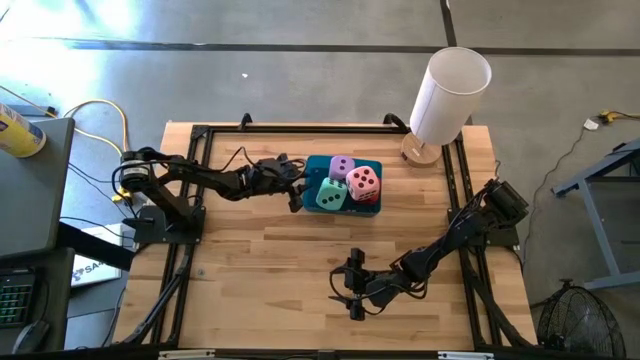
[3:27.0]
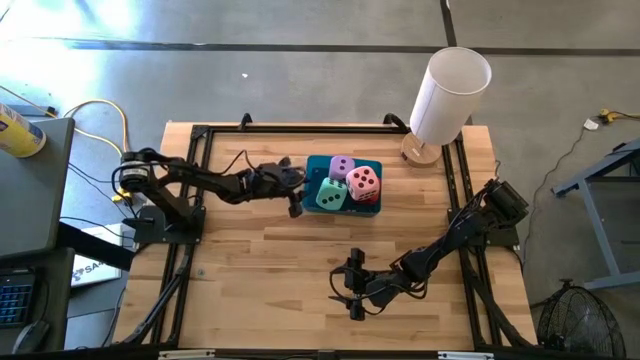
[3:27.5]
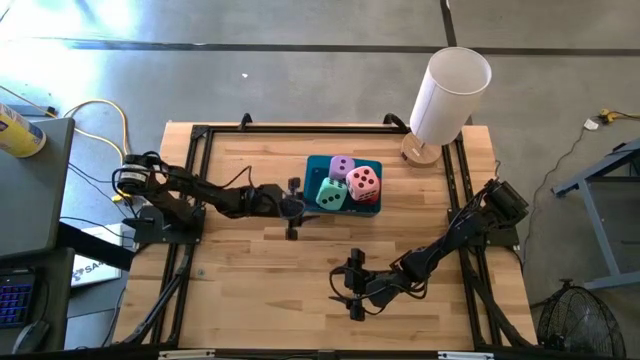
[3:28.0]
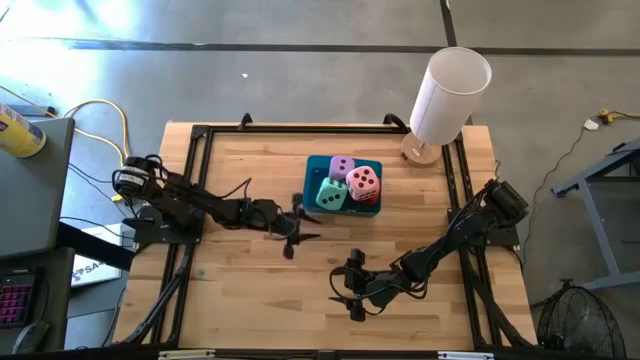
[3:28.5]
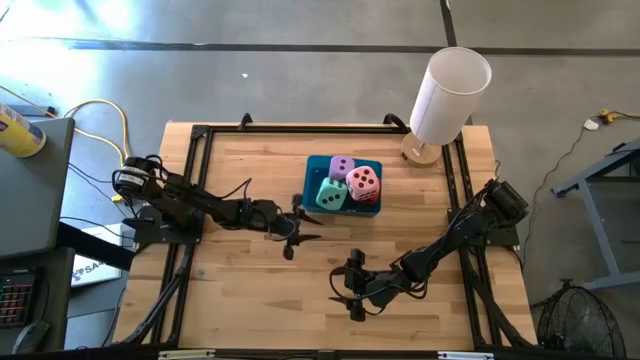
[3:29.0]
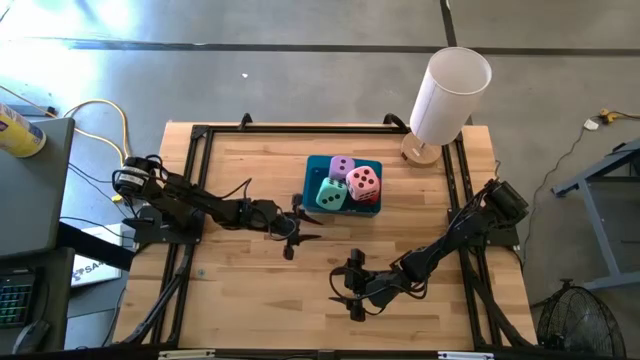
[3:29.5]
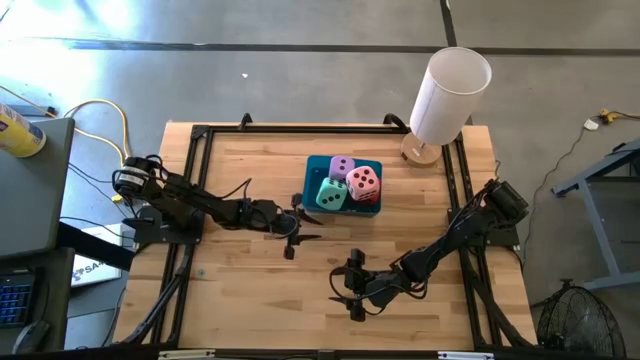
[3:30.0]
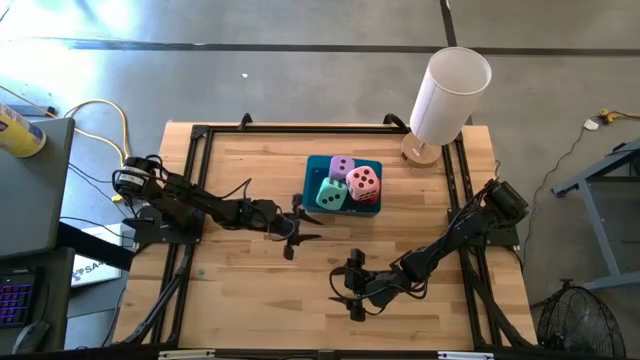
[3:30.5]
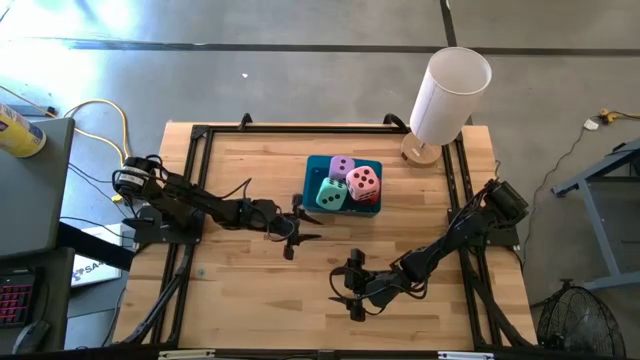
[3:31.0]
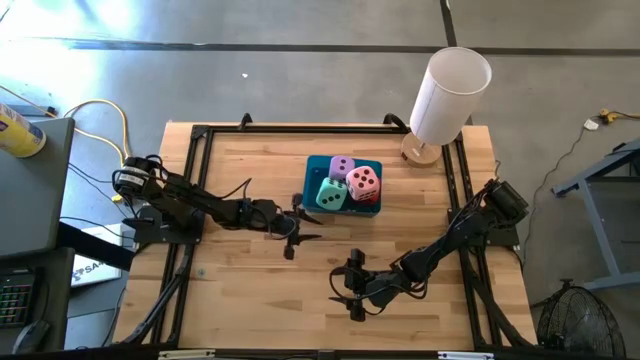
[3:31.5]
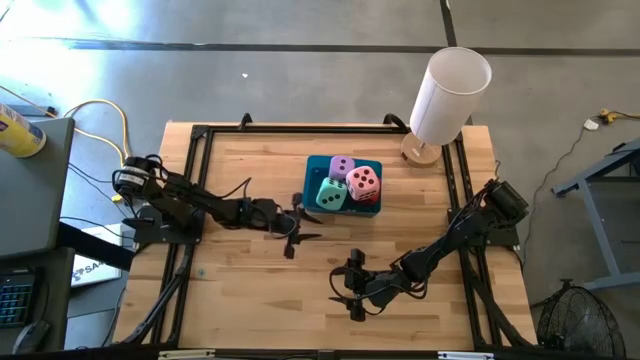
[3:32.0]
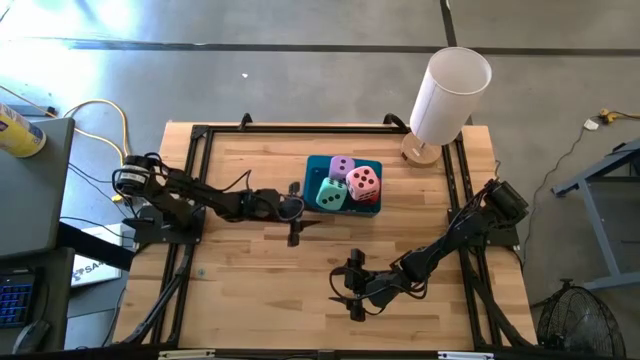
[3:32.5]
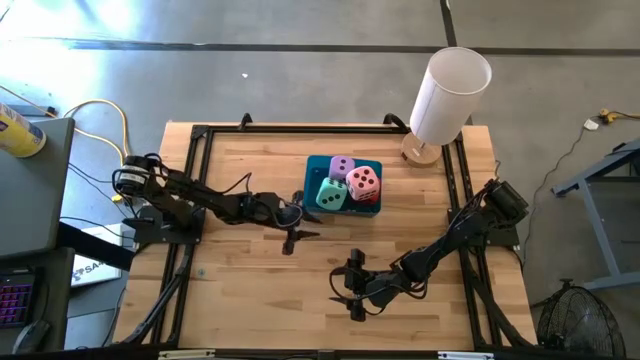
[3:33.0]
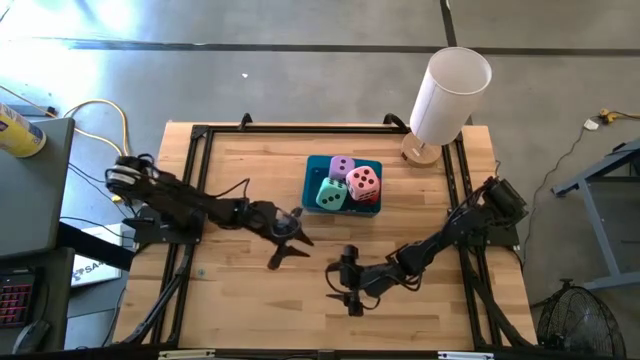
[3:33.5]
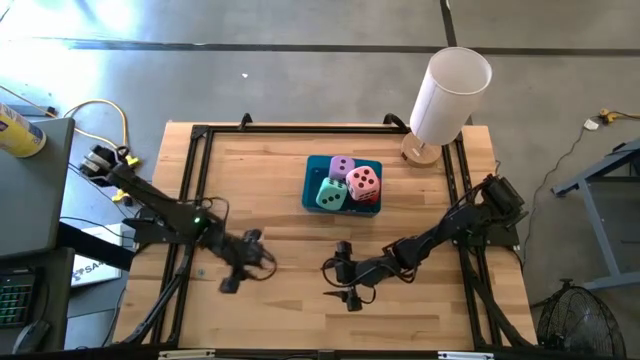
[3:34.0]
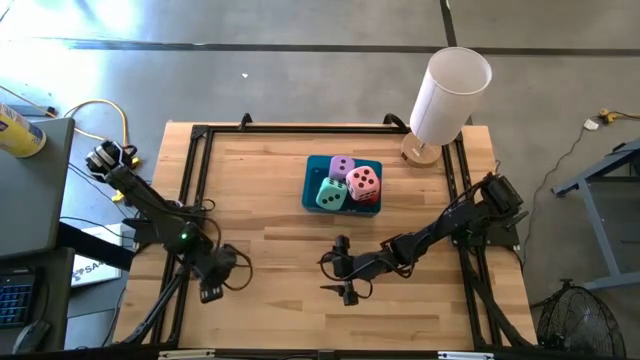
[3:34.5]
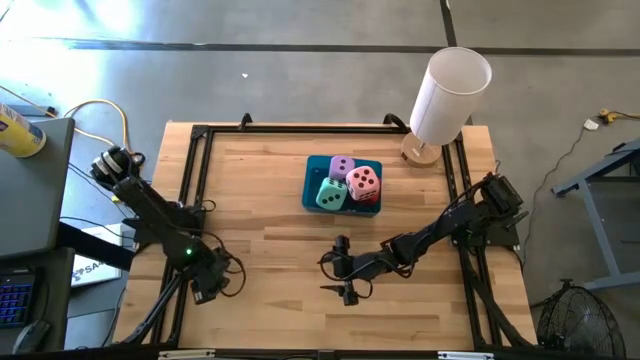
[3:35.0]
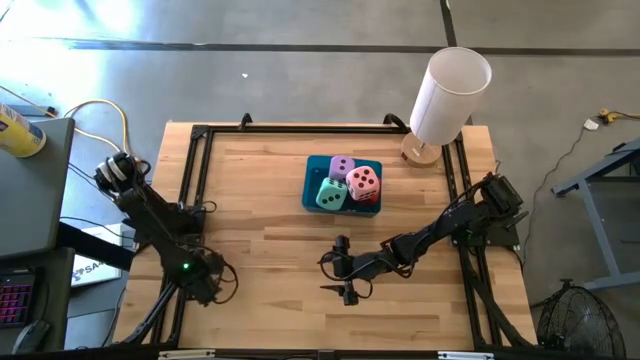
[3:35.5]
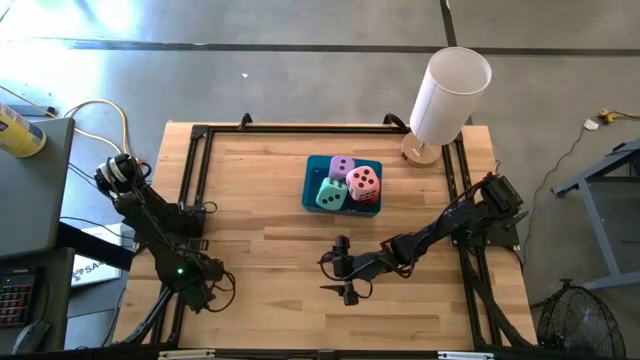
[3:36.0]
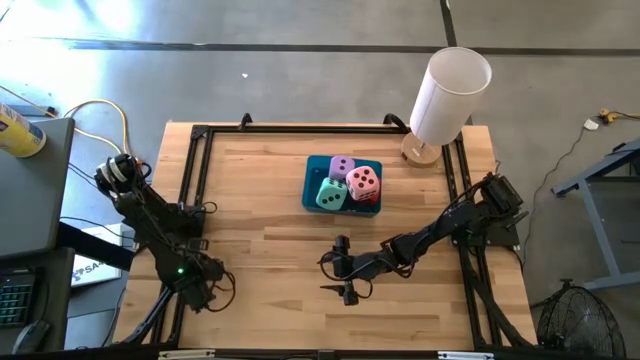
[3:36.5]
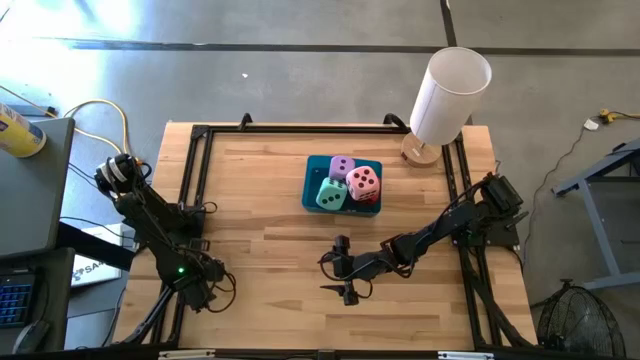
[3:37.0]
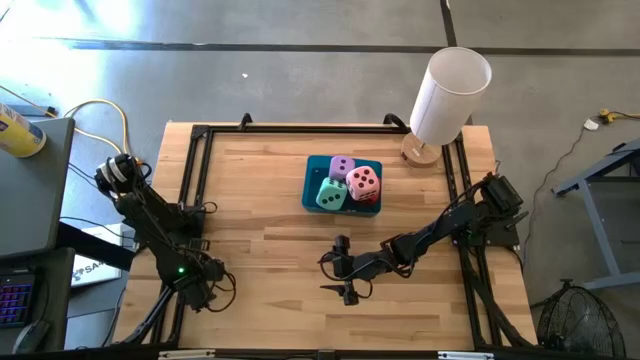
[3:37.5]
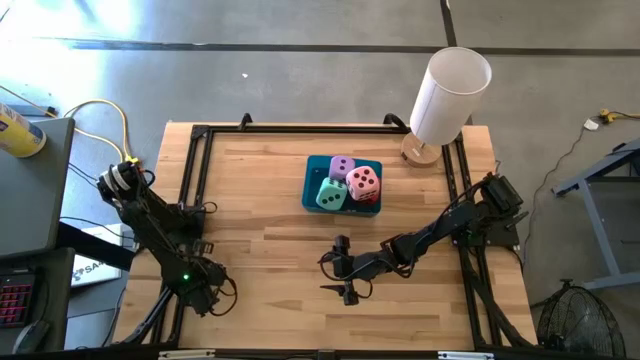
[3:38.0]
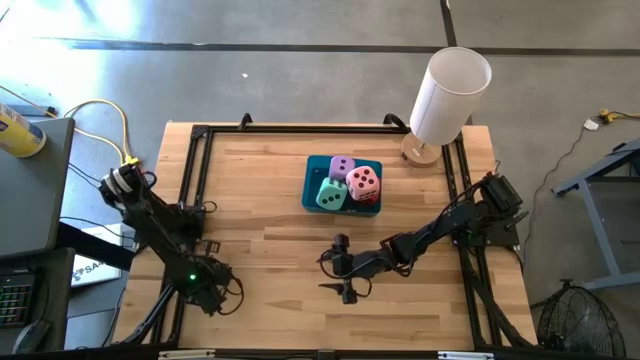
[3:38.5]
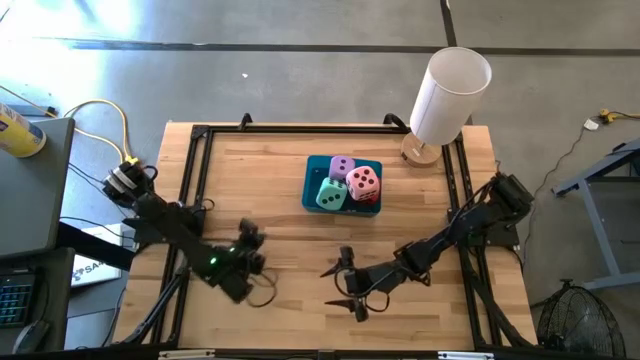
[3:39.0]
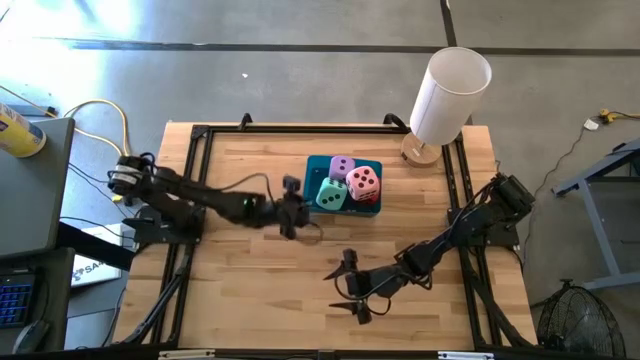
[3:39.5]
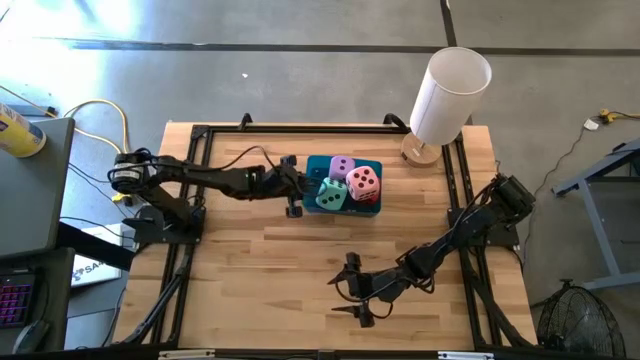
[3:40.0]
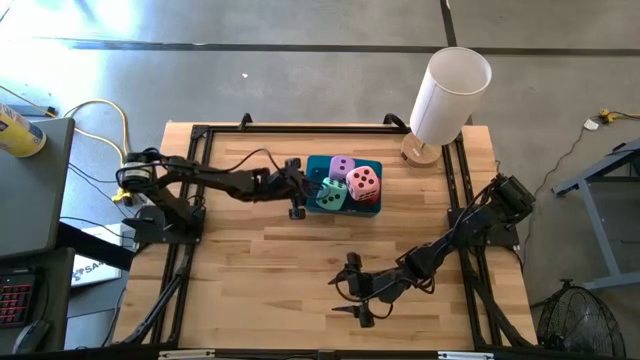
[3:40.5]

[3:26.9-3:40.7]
Task: Pick & Place Dice
Put the small blue dice into the blue bin

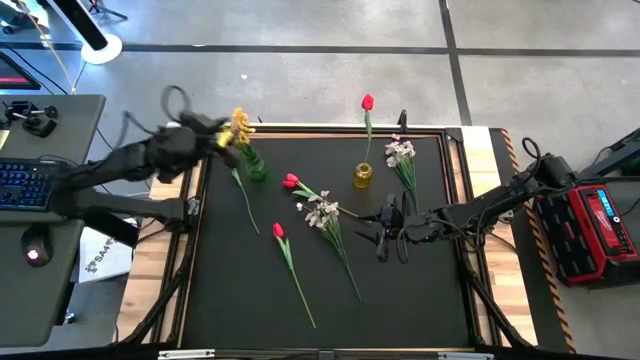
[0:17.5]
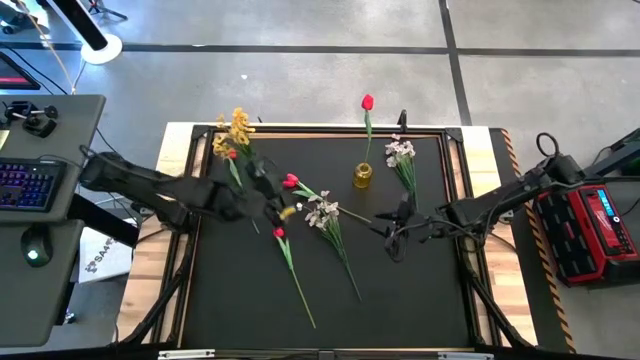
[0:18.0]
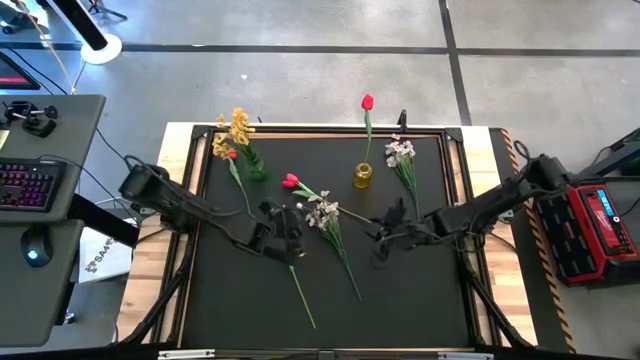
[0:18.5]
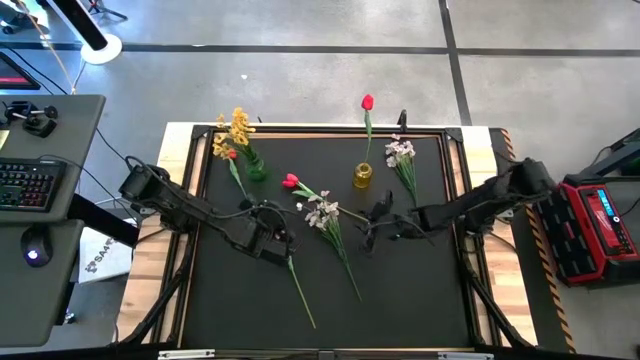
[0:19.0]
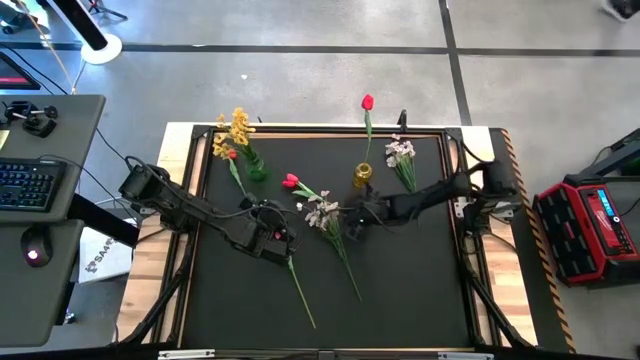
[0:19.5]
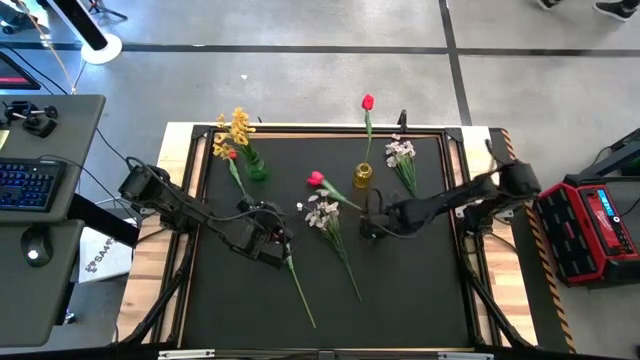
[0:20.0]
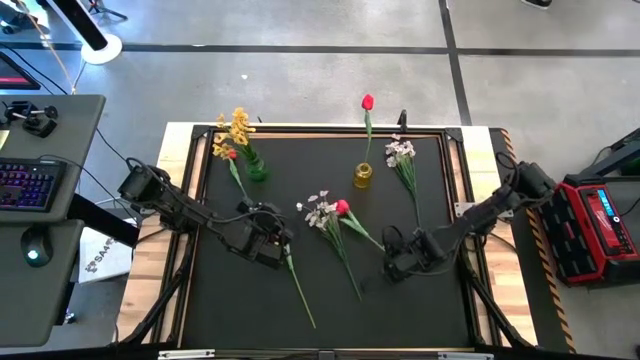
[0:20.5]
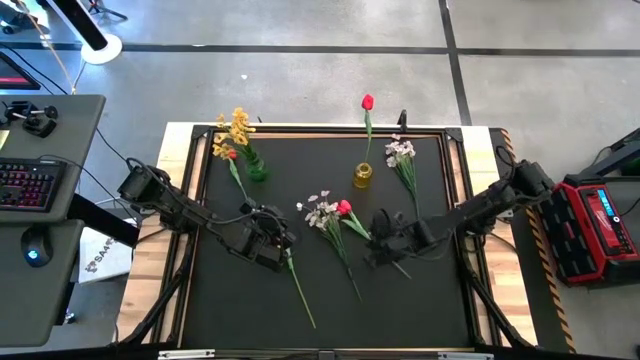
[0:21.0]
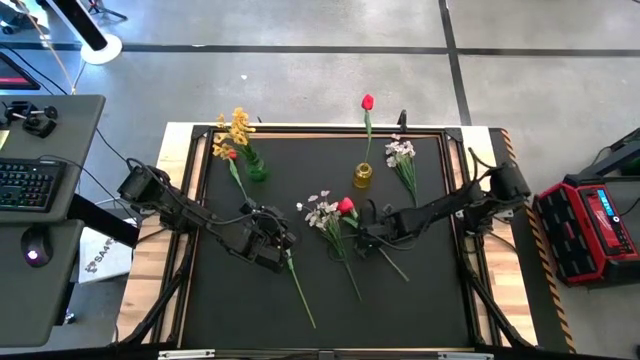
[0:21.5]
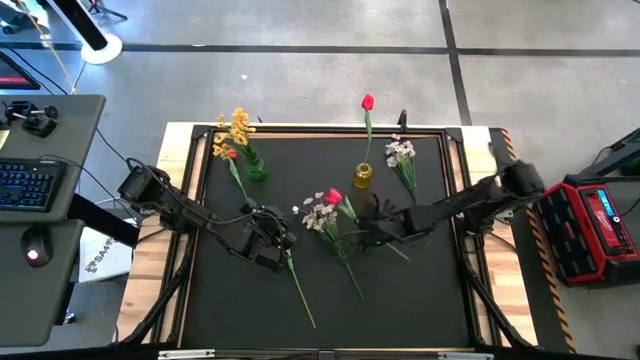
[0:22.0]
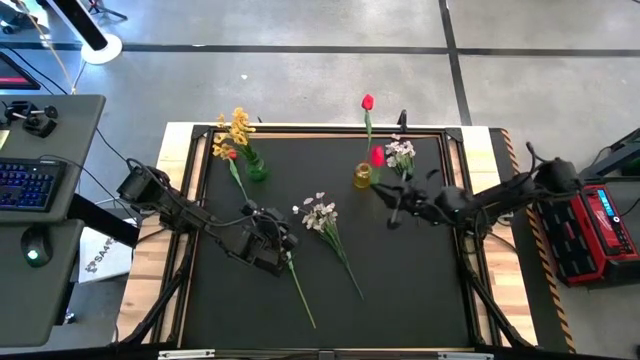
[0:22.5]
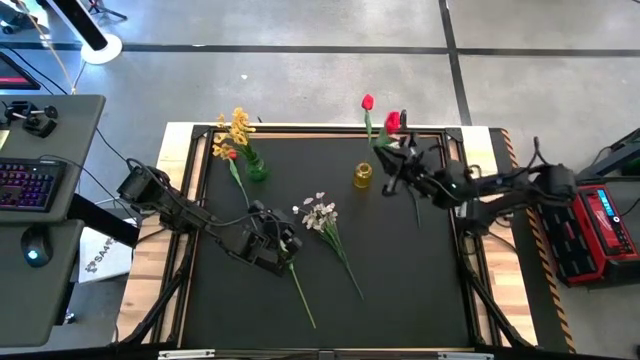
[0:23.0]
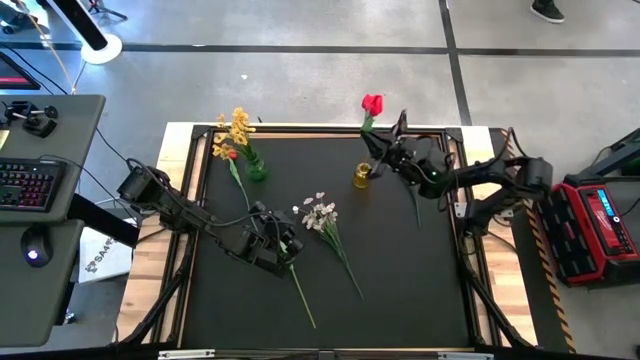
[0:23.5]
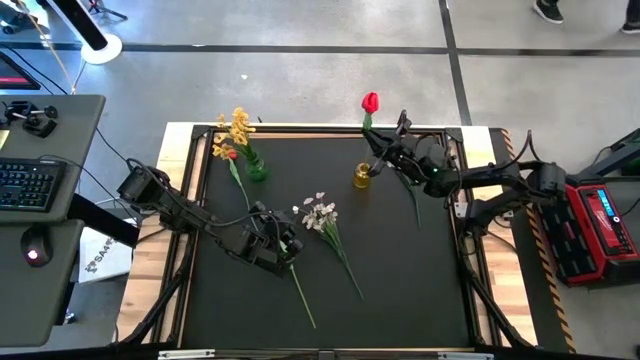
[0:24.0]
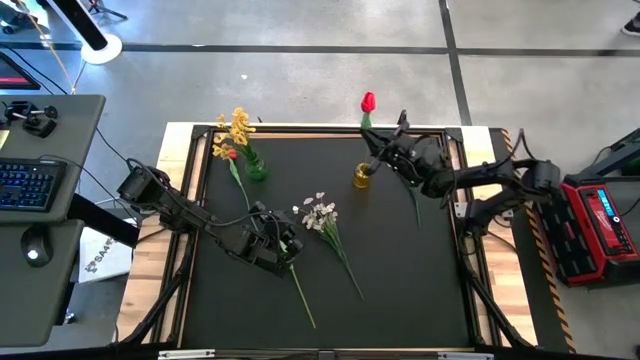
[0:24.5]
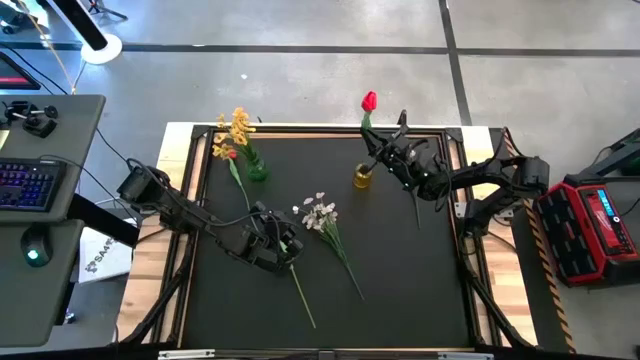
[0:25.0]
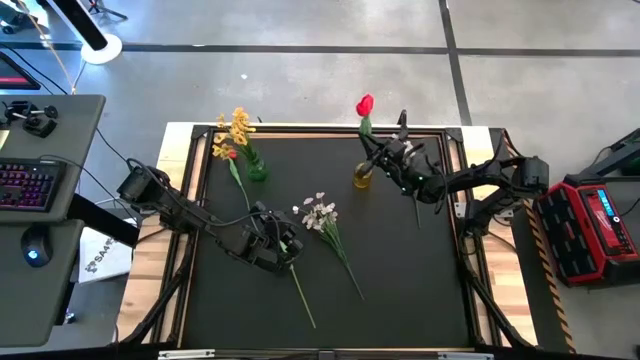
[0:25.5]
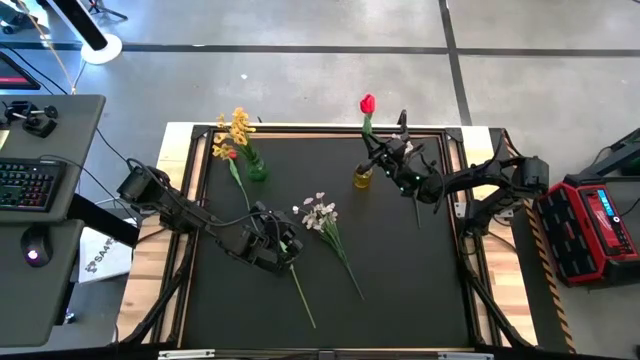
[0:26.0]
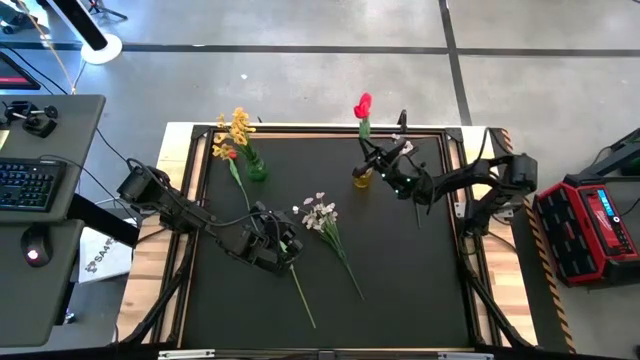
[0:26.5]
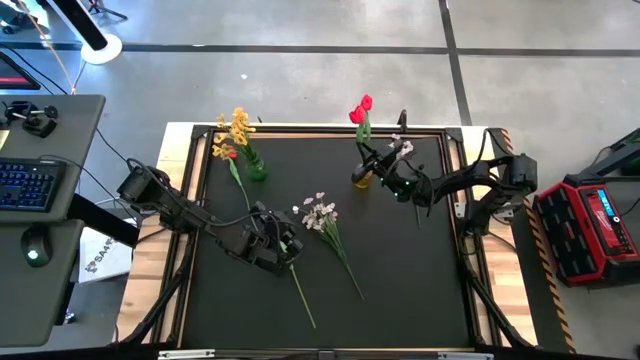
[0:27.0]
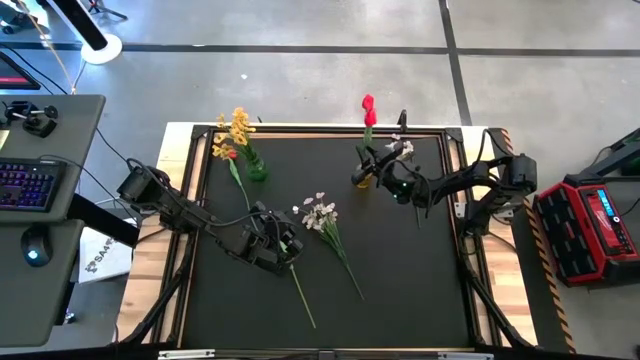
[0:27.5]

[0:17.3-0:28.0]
Task: Sort flowers into vase by color
Put the top right red flower into the yellow vase
